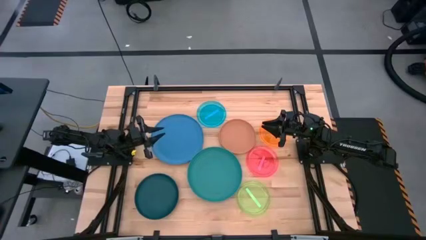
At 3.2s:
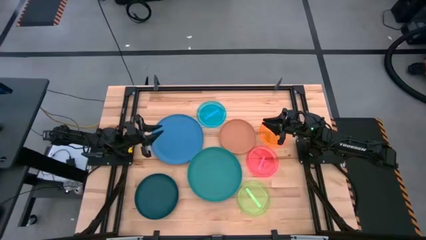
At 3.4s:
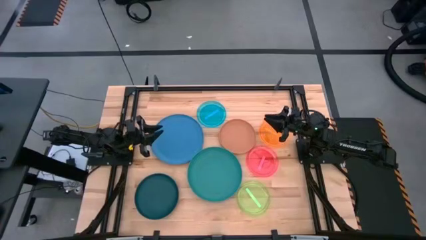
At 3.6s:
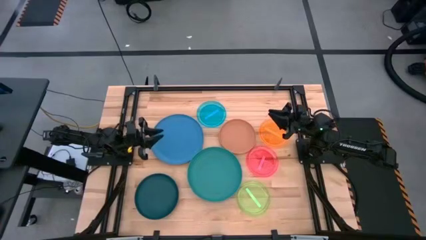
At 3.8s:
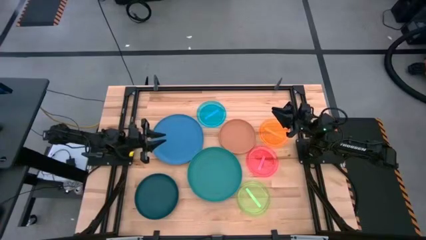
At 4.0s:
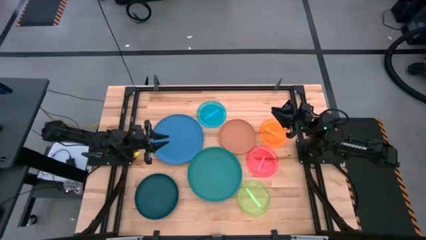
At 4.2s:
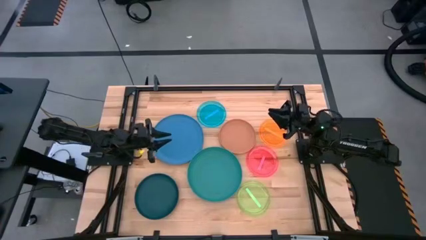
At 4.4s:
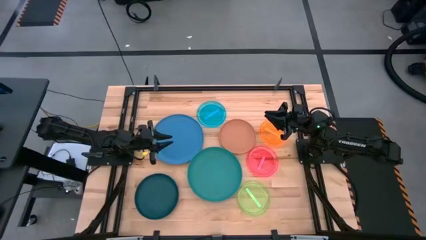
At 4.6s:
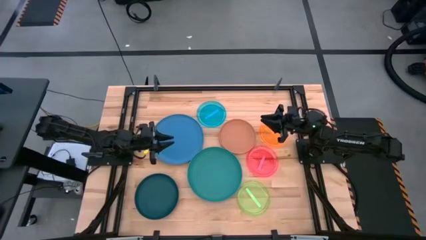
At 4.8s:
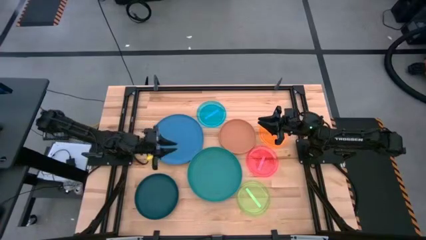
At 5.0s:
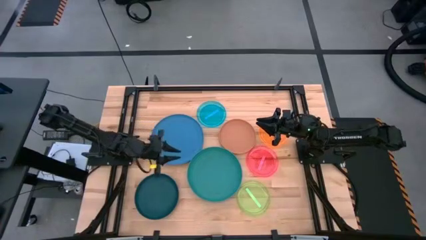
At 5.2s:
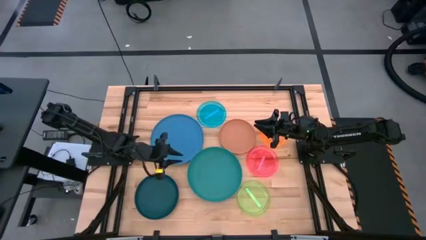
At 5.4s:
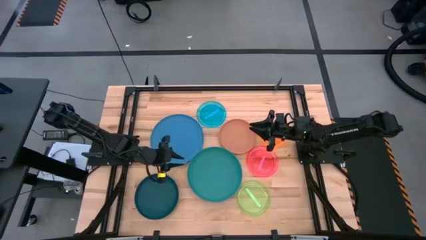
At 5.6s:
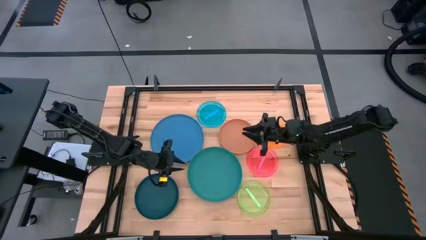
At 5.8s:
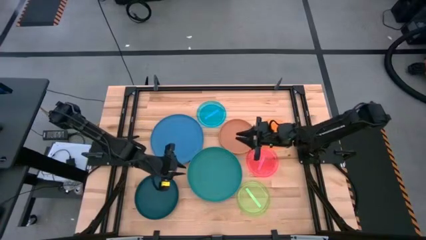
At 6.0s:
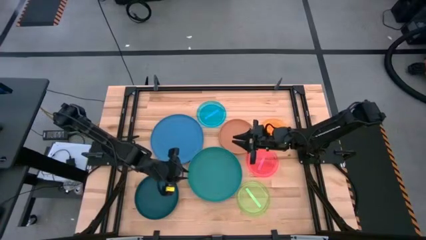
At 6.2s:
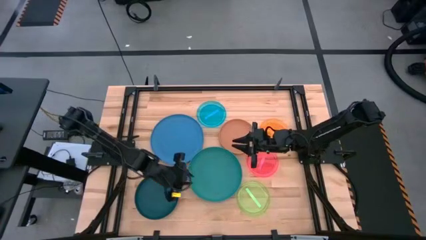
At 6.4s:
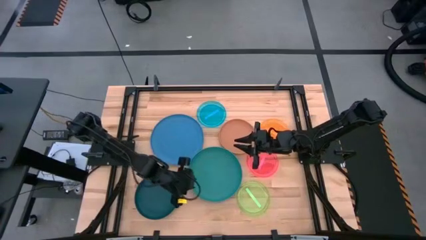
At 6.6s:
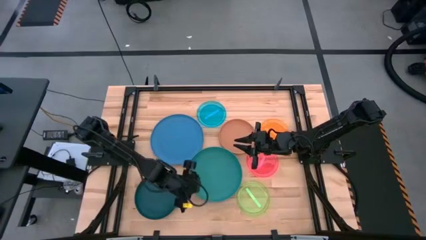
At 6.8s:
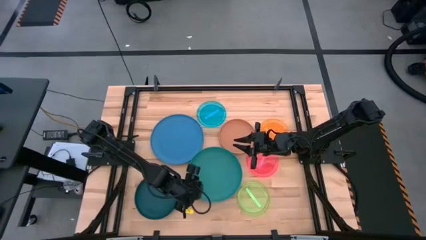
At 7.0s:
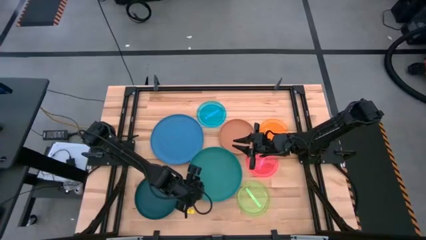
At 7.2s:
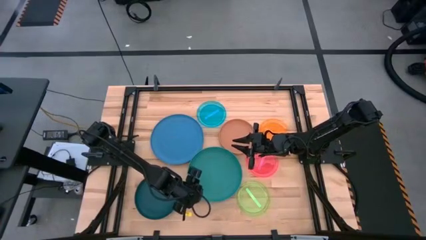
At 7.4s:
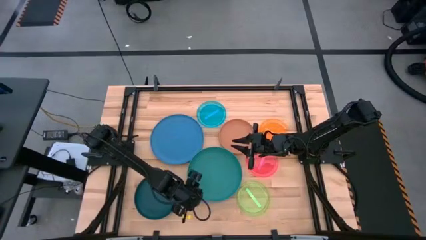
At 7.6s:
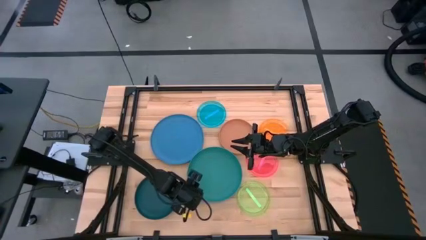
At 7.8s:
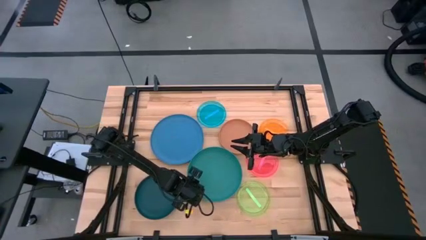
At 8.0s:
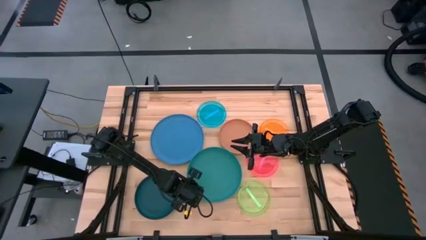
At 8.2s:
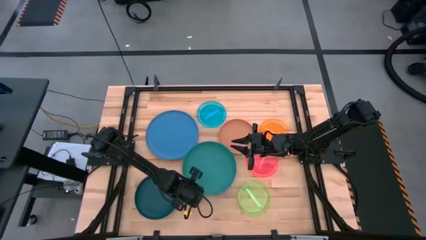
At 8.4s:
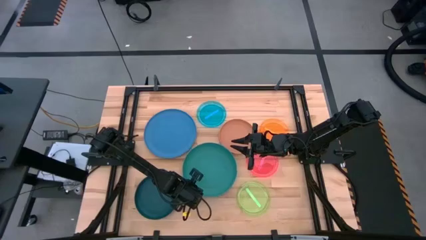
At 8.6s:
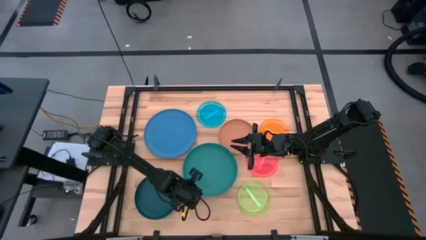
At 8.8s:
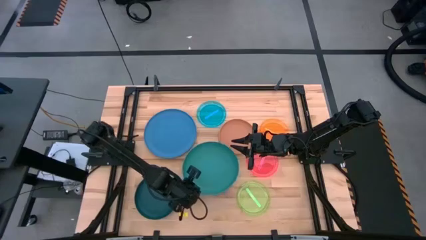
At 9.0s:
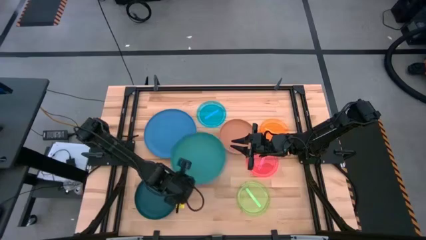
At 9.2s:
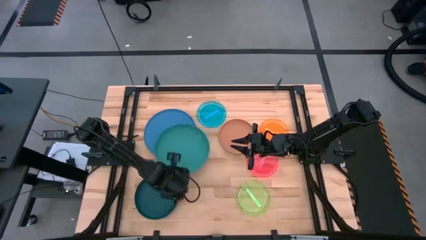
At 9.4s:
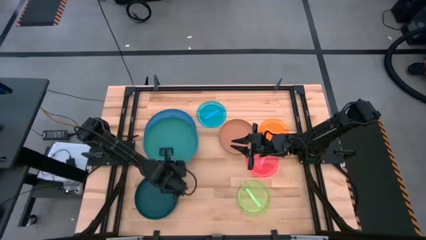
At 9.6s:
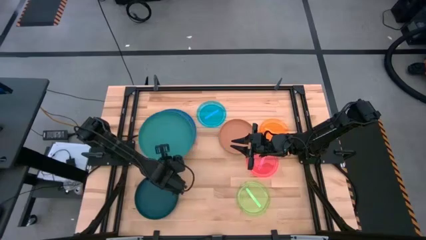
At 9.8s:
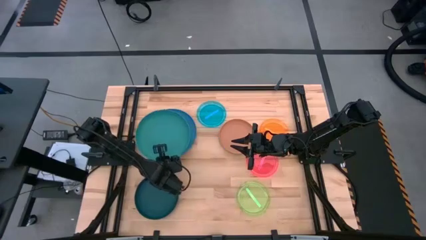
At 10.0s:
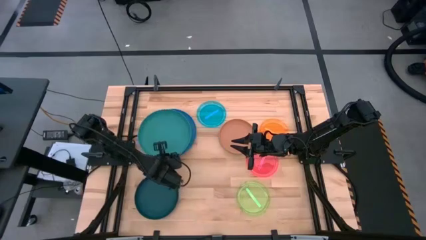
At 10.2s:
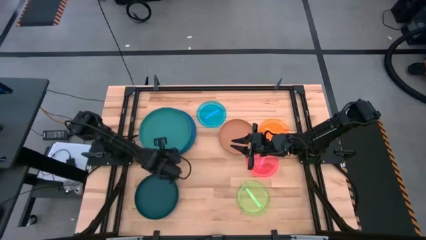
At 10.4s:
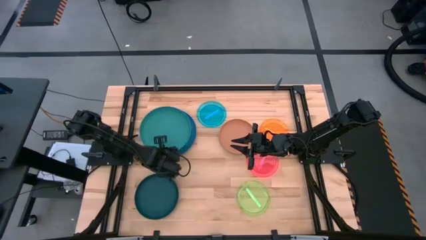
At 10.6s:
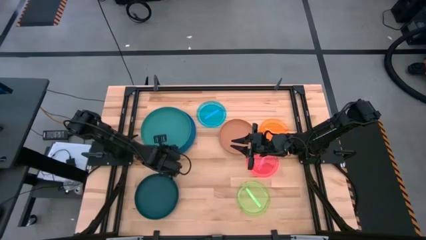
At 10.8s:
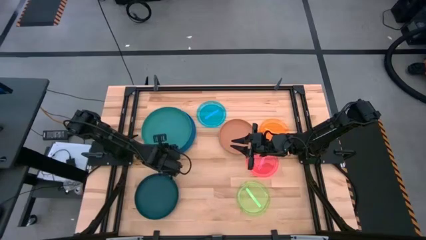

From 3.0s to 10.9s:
Task: Stack plastic plates
Stack the green plate on top of the blue plate

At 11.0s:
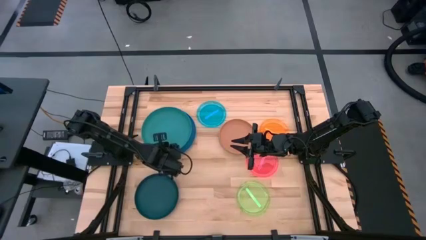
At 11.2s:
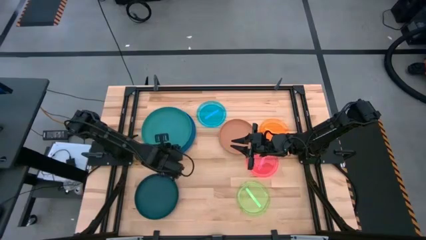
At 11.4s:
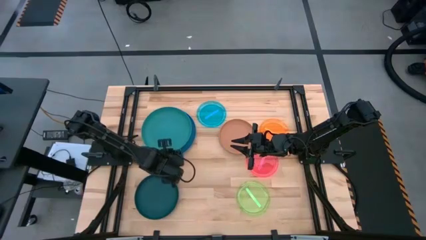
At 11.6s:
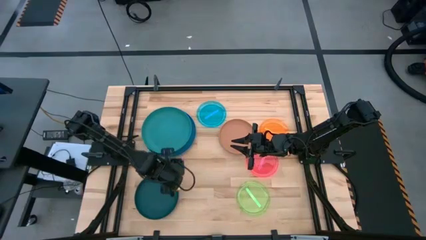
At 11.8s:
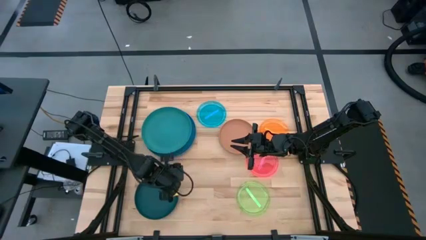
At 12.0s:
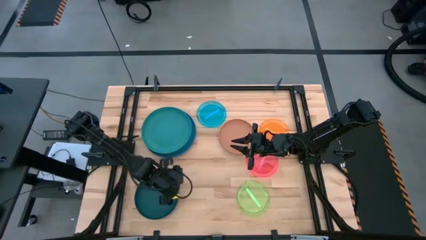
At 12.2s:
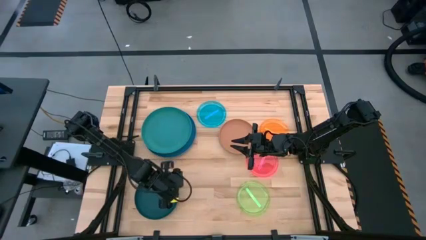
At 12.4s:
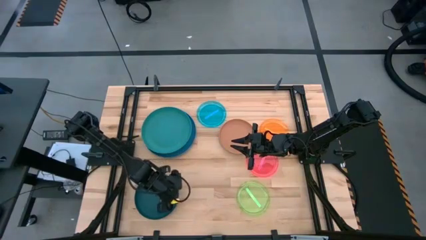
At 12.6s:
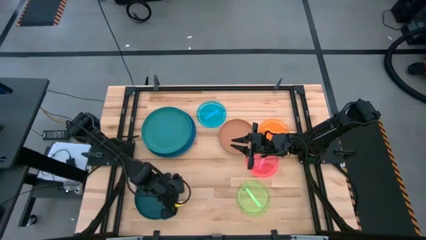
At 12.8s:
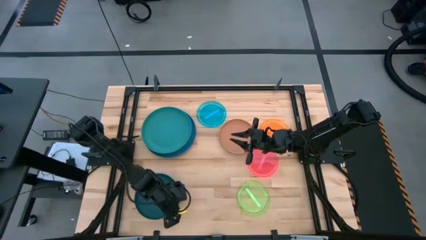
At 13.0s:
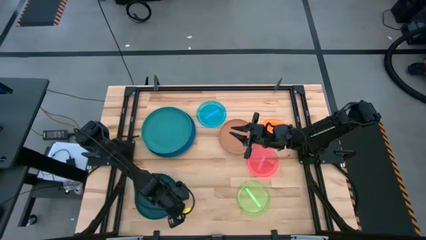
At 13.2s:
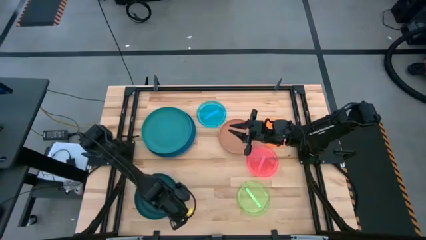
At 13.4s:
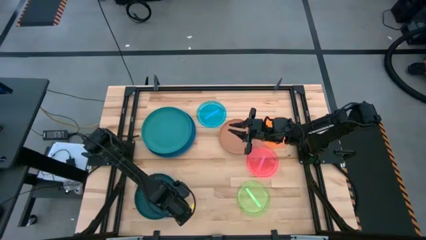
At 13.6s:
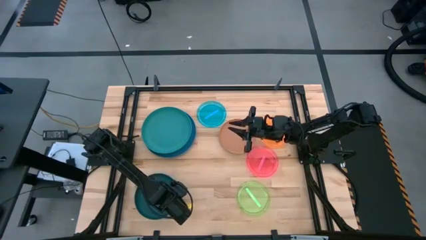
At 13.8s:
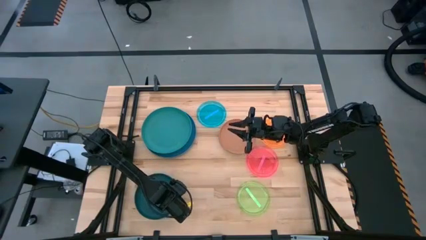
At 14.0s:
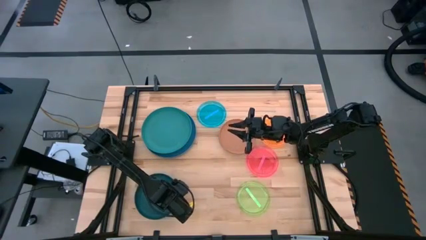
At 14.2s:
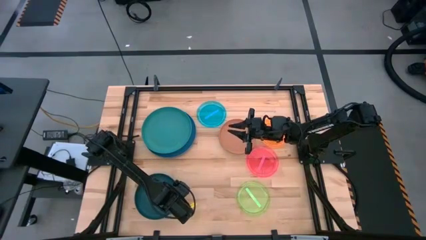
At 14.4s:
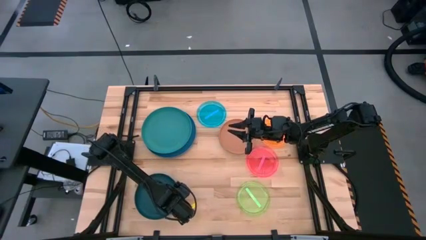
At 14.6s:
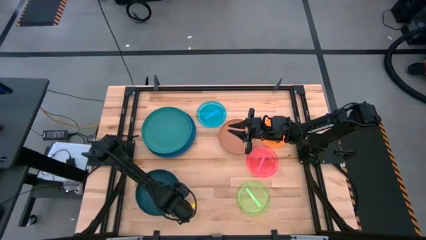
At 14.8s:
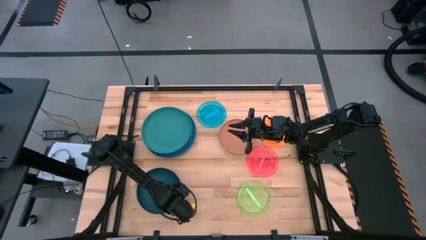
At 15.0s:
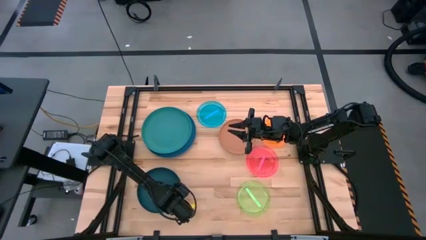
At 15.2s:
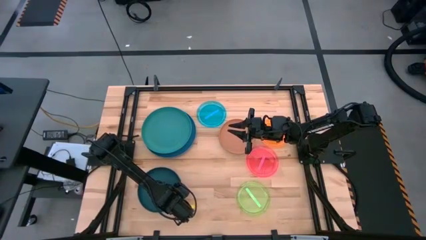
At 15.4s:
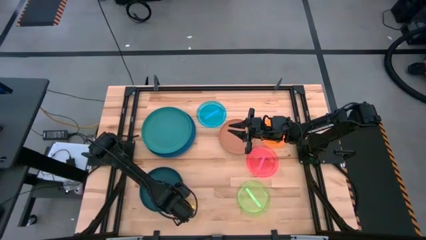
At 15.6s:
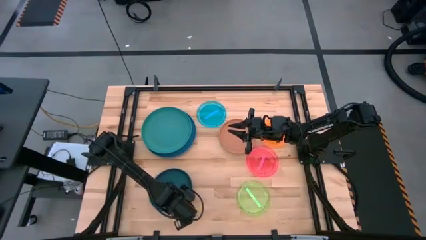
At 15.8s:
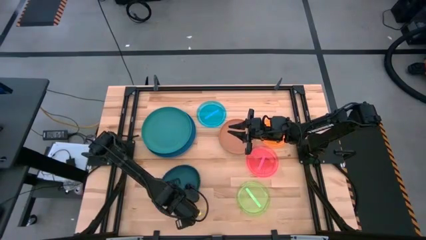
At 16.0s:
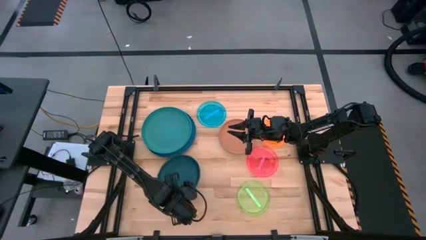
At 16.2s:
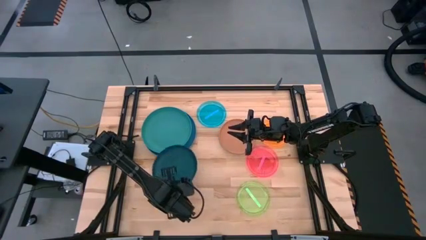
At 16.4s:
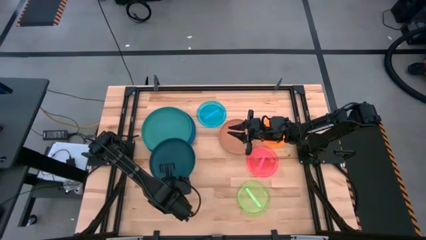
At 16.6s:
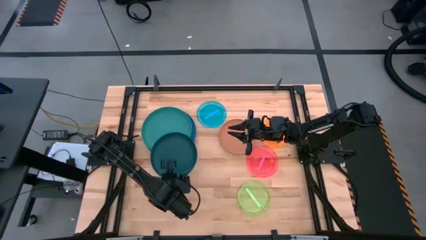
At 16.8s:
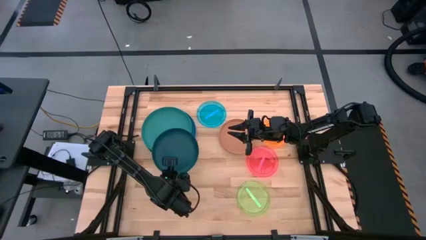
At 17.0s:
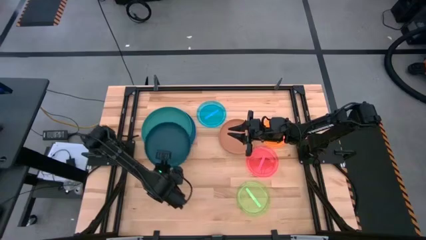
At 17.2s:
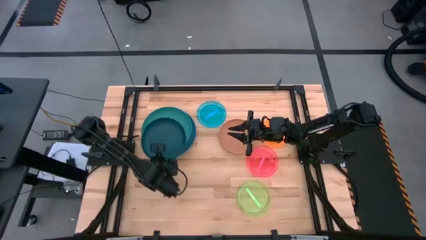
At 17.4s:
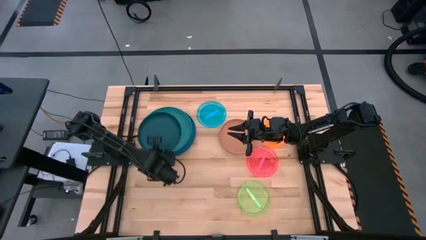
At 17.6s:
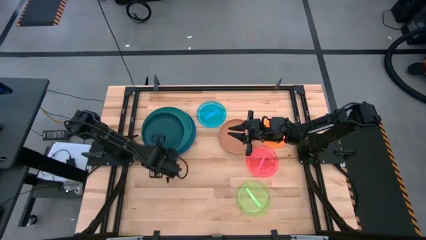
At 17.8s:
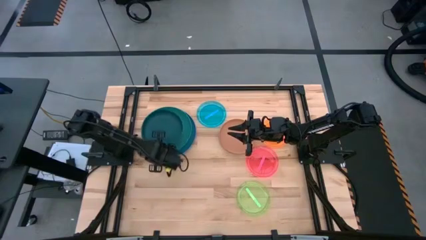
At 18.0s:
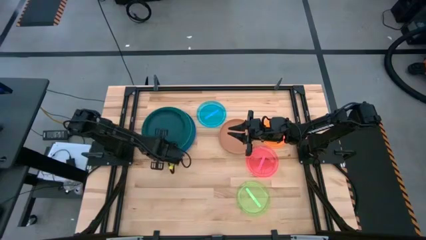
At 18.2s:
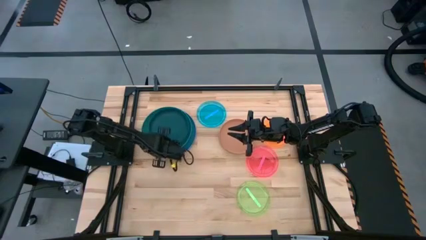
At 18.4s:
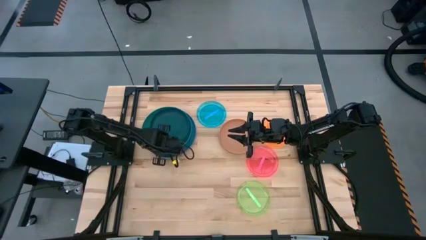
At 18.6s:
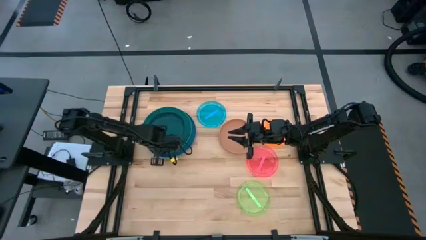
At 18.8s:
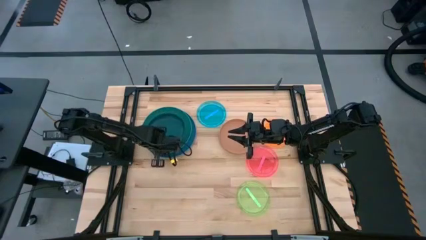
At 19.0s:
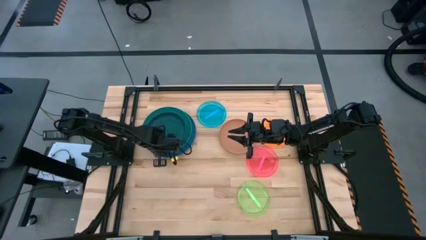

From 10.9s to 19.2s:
Stack the dark blue plate on top of the green plate
